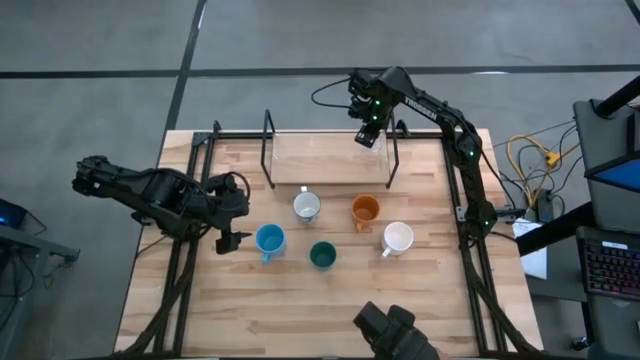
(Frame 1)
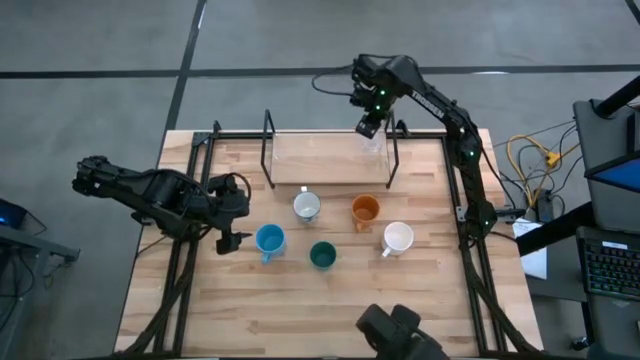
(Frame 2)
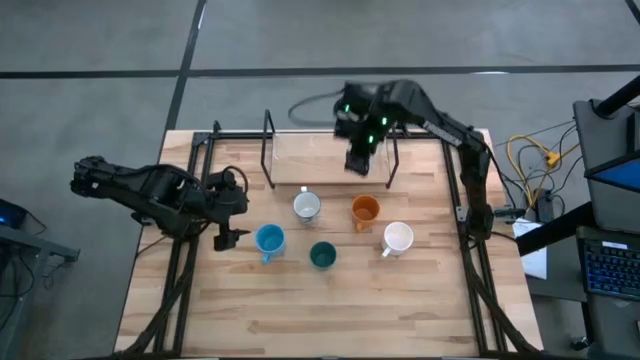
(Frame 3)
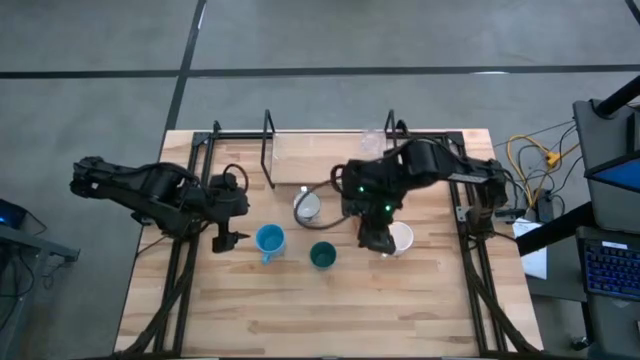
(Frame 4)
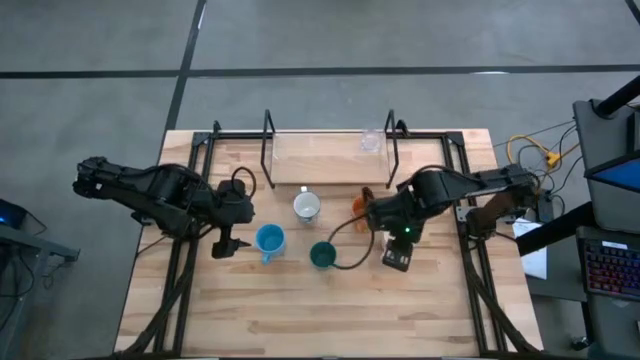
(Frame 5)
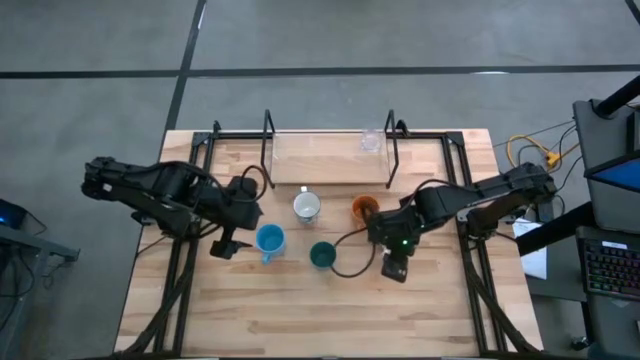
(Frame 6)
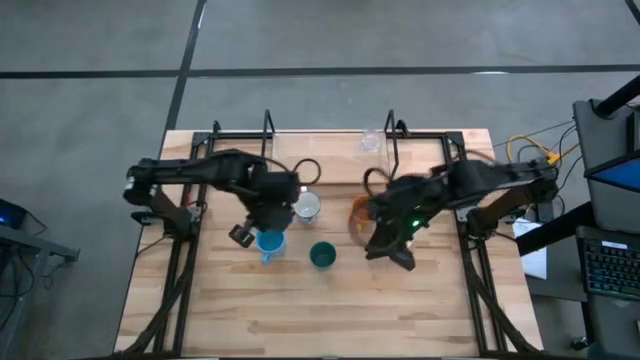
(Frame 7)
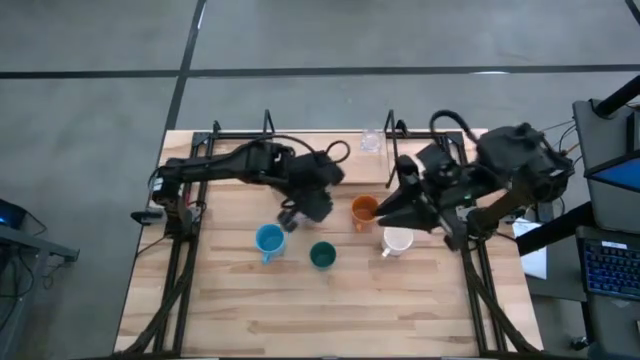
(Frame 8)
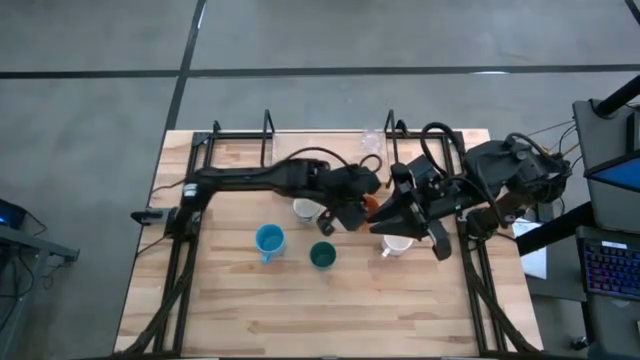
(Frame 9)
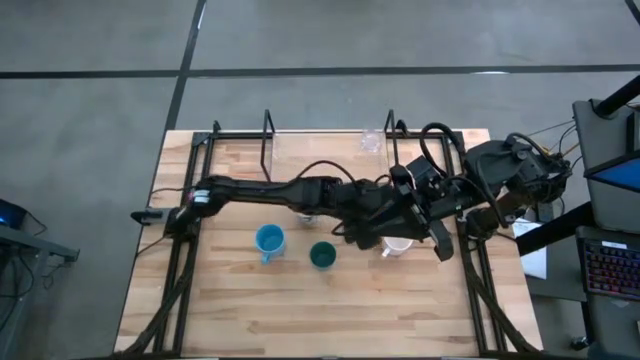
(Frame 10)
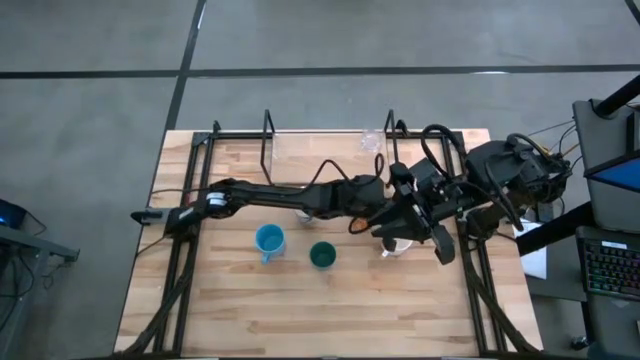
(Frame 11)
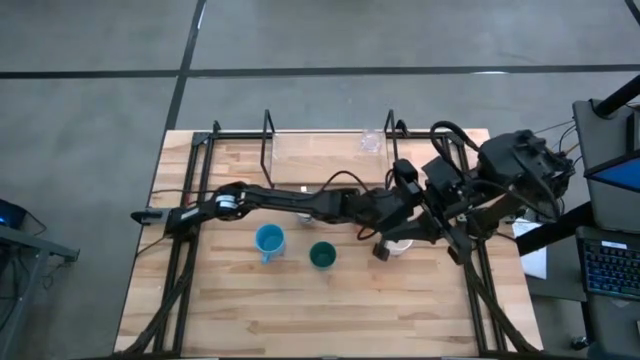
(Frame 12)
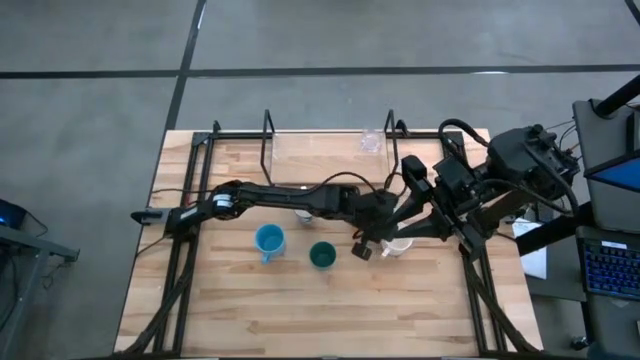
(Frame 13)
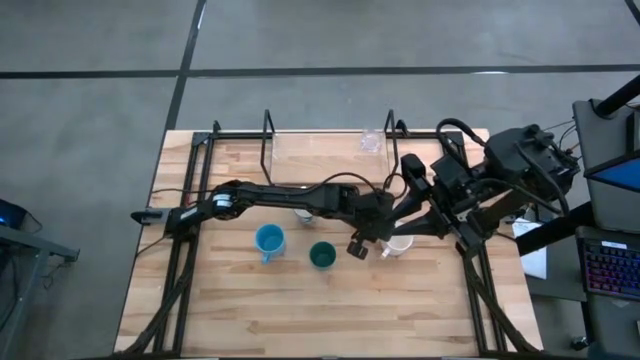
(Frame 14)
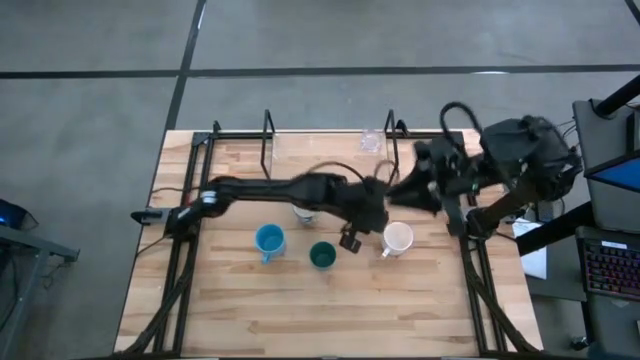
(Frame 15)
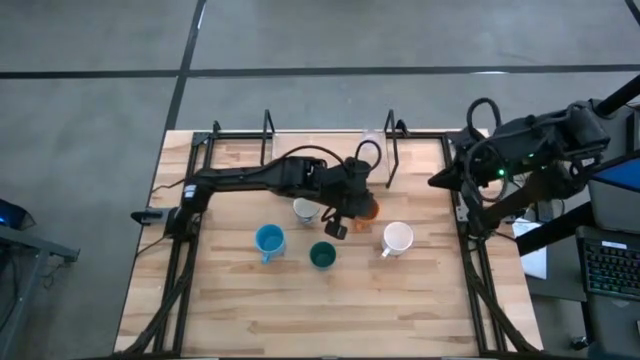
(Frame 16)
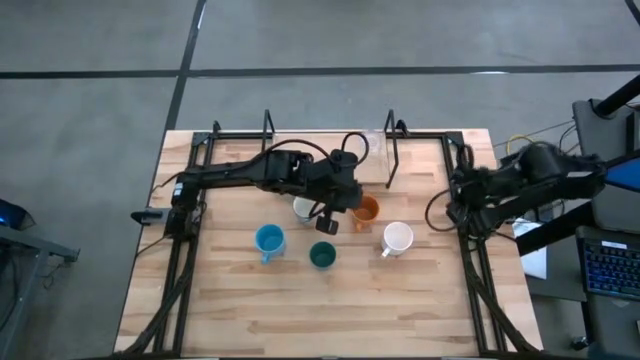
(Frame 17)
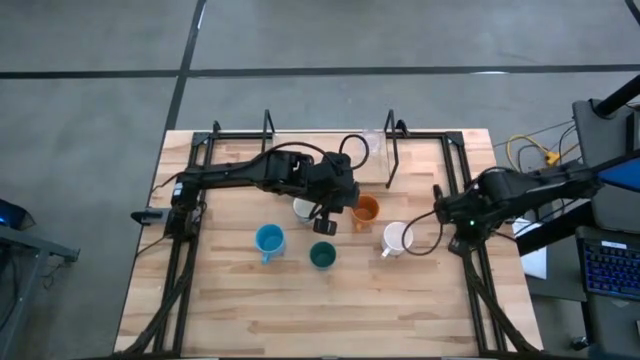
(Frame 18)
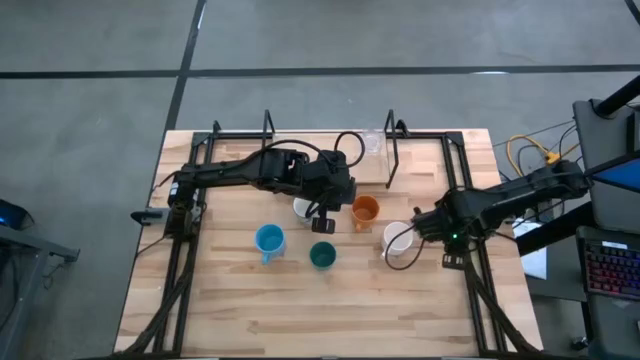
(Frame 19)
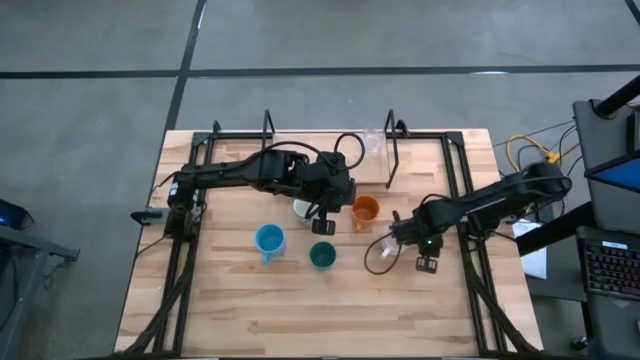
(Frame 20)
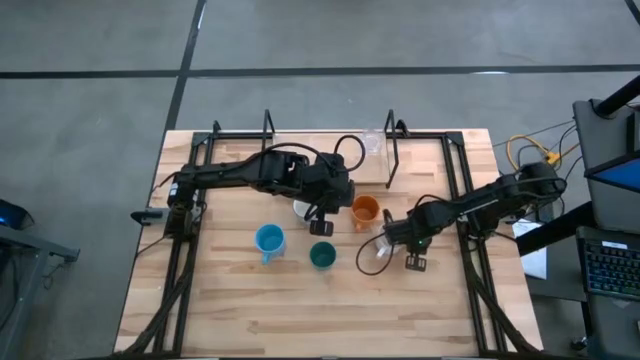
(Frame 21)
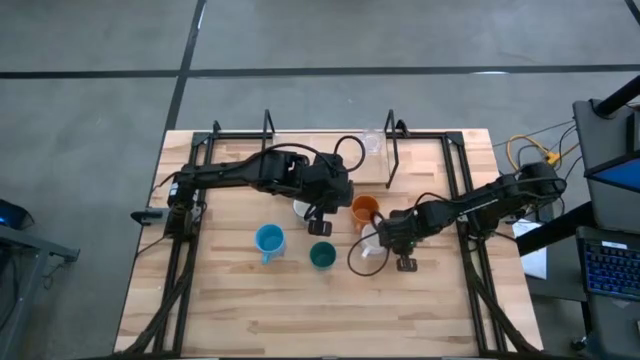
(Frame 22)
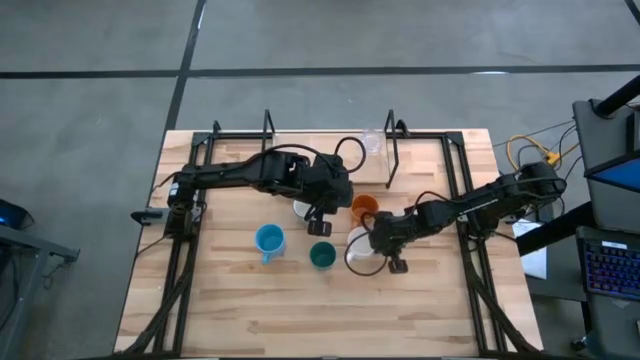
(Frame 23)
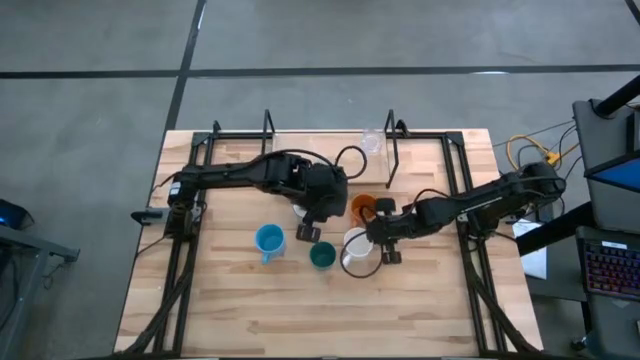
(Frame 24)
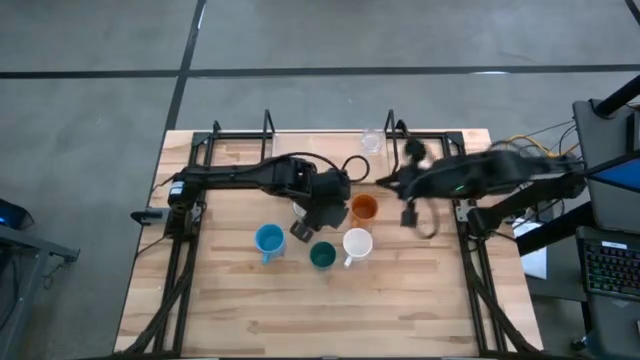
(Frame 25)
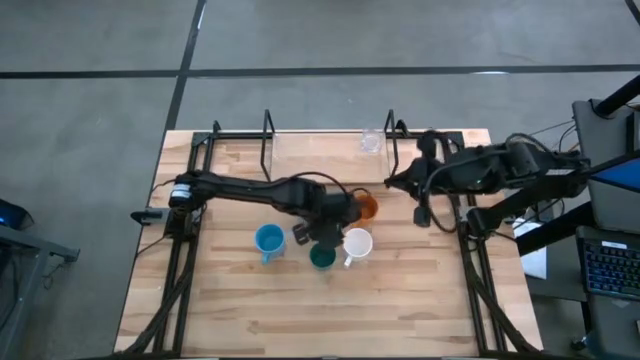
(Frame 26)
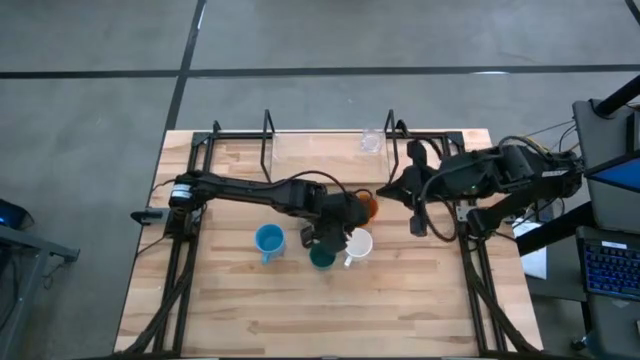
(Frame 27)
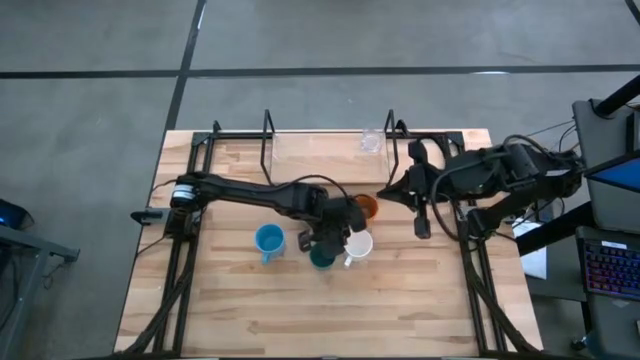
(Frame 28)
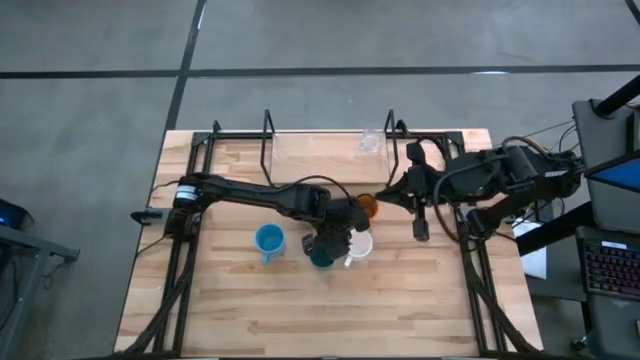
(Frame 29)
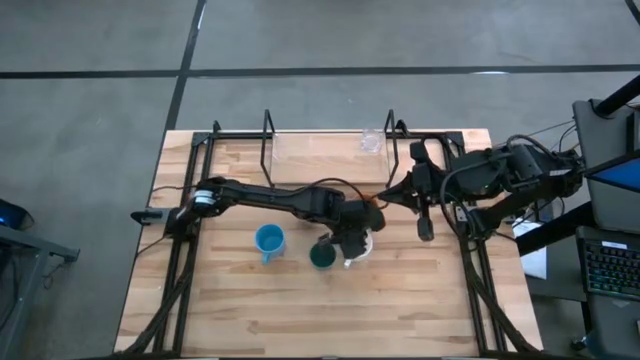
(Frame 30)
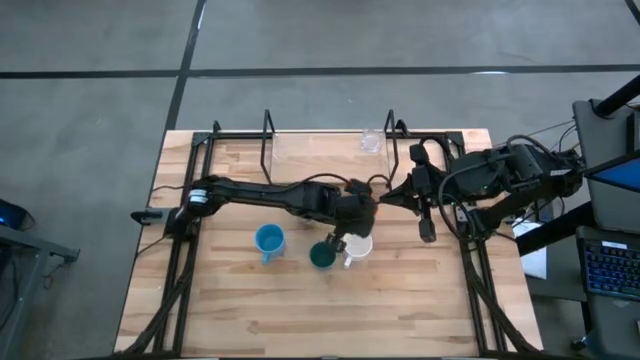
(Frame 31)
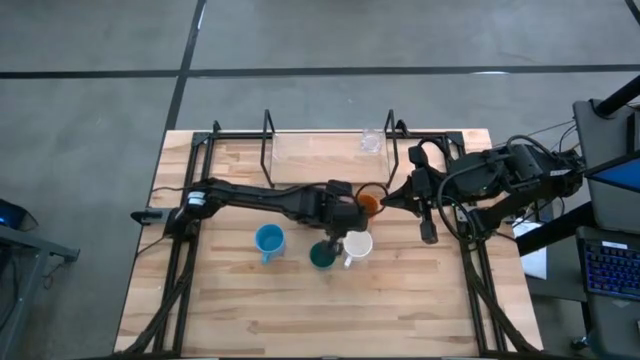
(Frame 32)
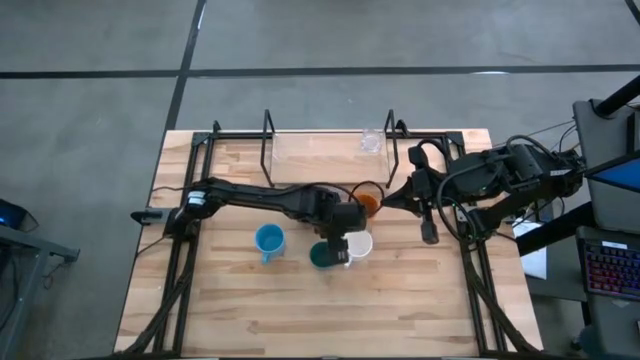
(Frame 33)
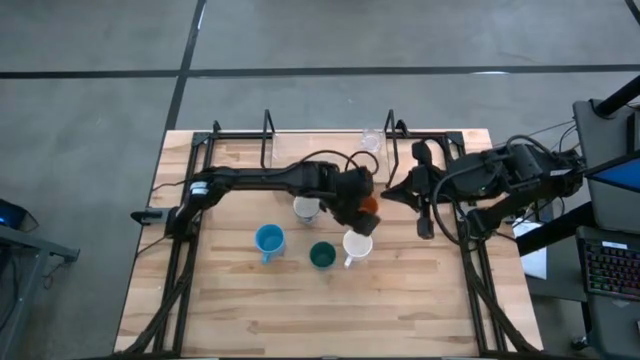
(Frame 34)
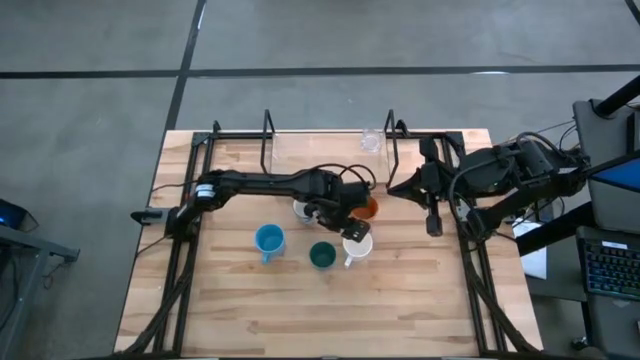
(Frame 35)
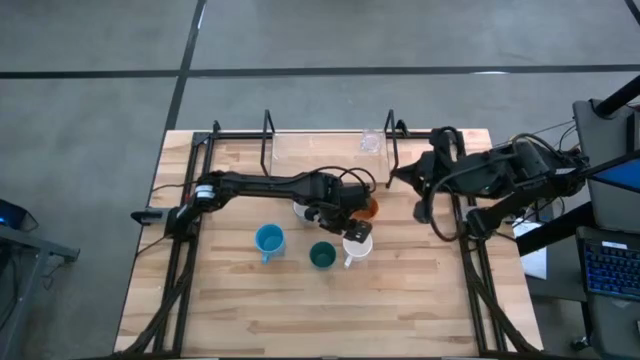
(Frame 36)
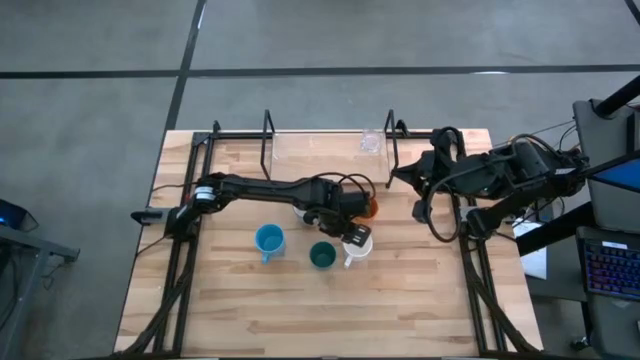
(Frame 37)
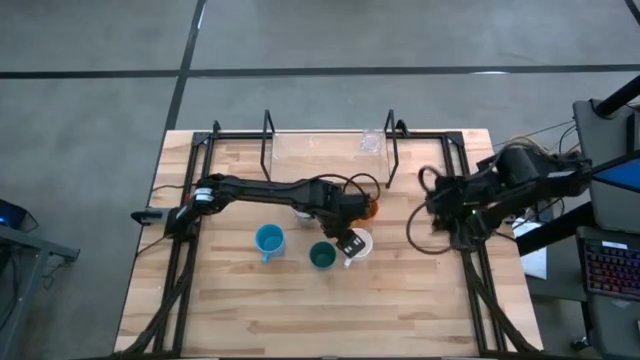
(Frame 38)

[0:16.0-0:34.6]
Task: Stack small to large cups/mugs on shelf
Put the white mug on the shelf
